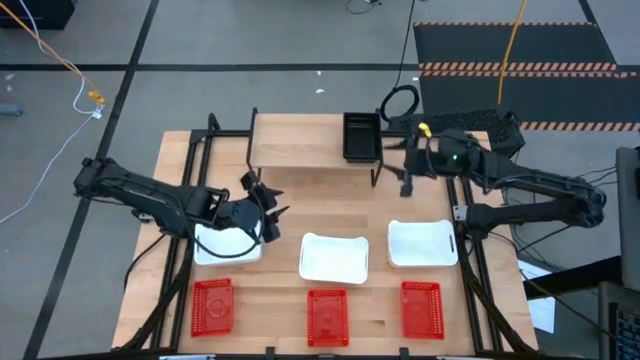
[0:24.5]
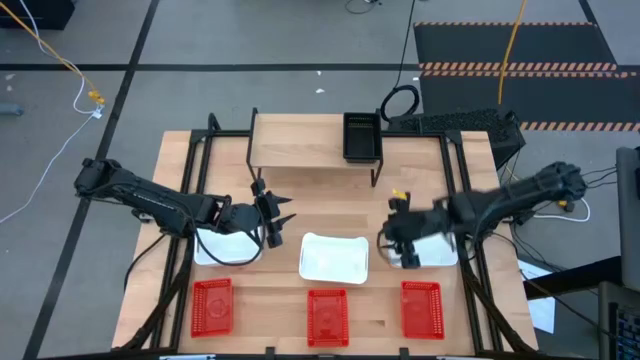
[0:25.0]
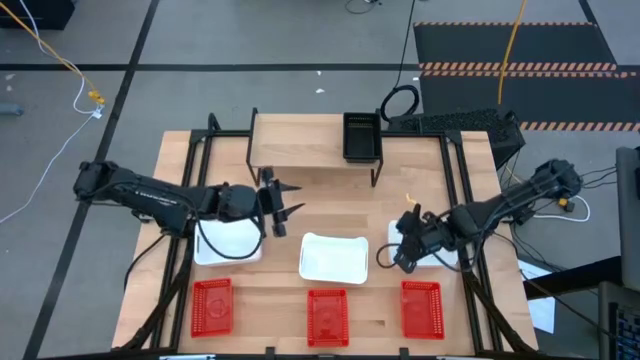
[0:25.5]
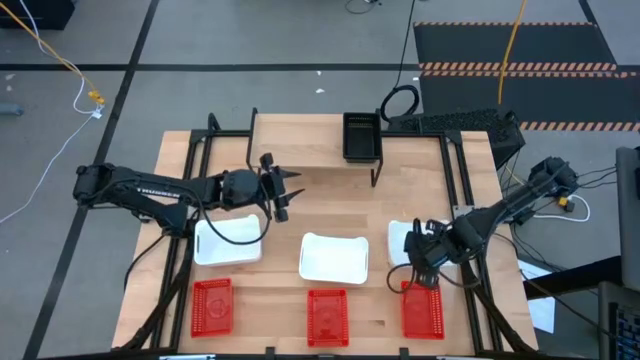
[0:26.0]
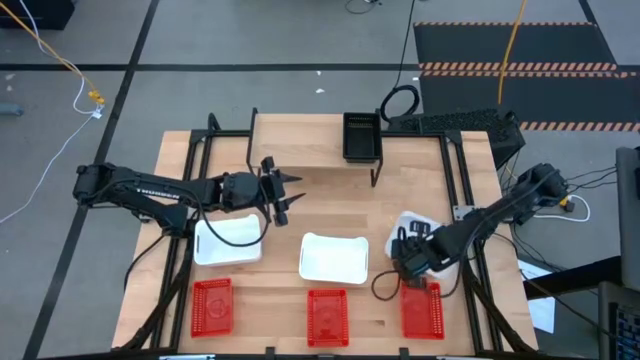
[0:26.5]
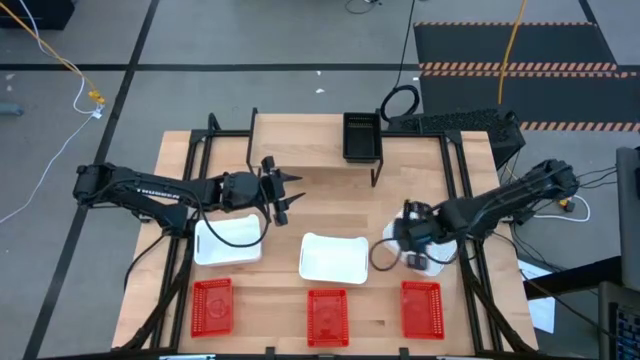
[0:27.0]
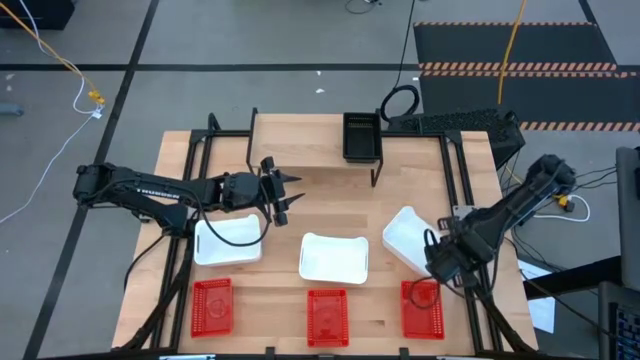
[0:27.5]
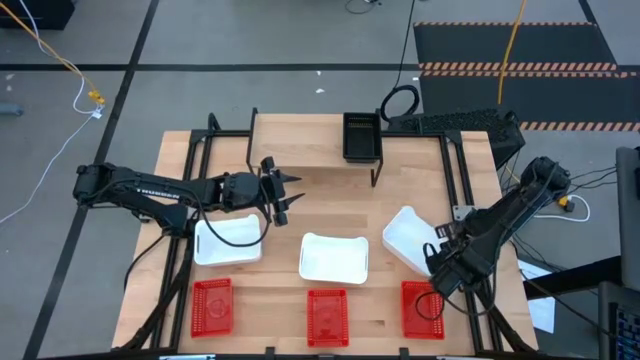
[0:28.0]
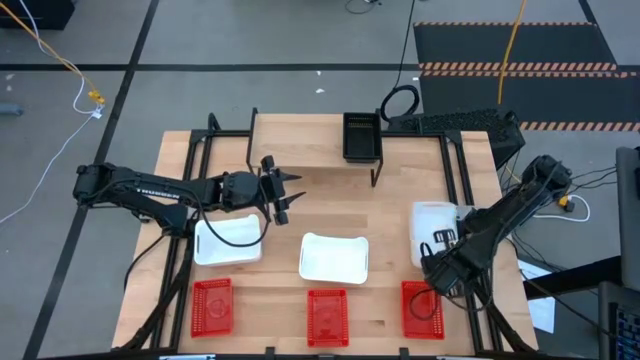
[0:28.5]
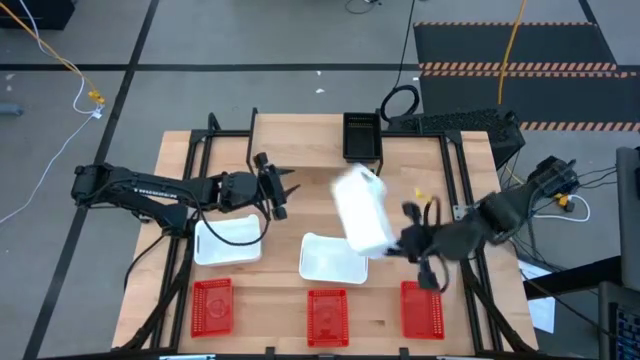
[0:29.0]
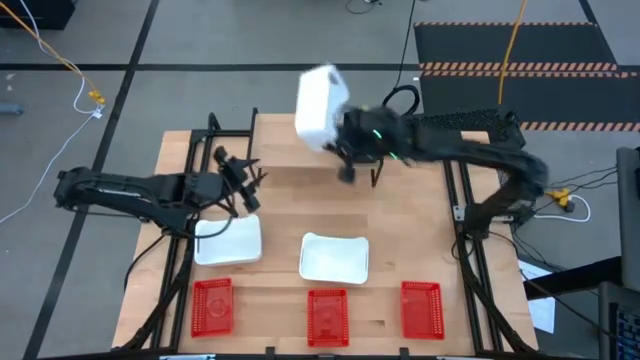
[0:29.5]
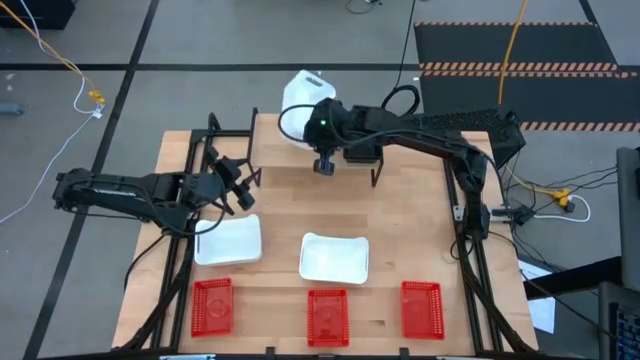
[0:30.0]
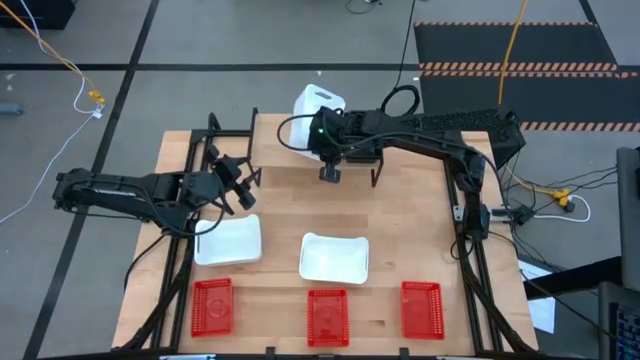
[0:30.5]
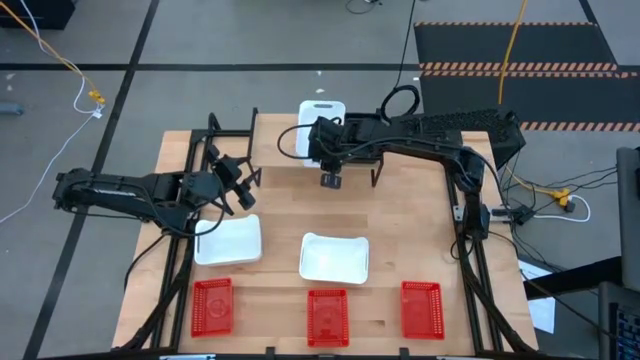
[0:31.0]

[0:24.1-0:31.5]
Task: Stack baskets on shelf by color
Put the right white bin on the shelf

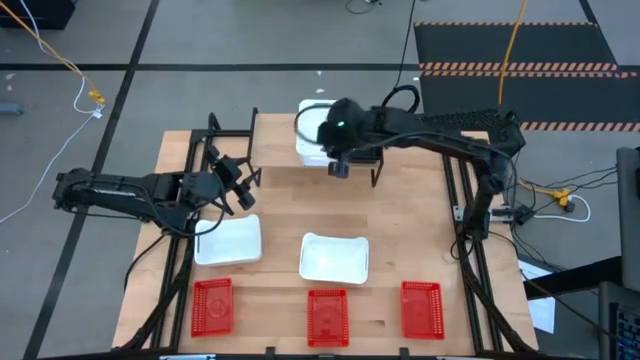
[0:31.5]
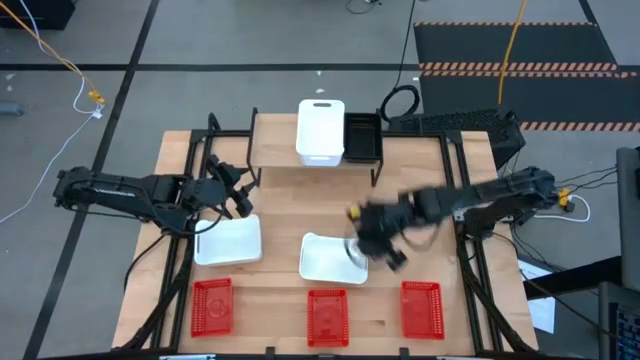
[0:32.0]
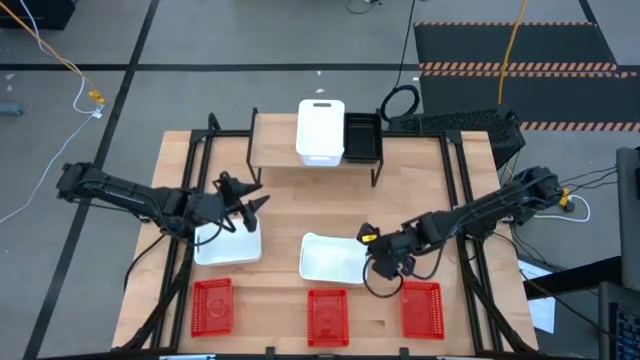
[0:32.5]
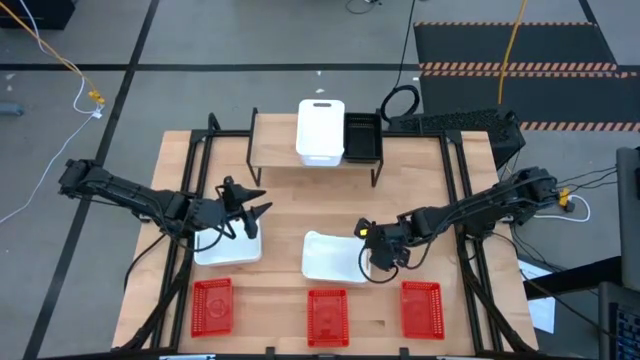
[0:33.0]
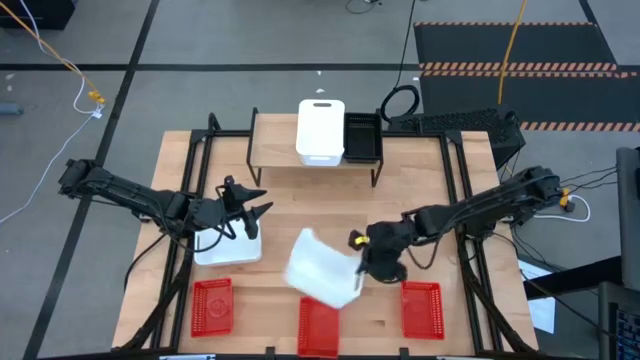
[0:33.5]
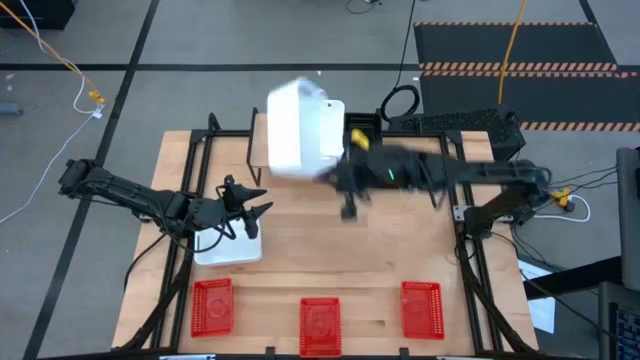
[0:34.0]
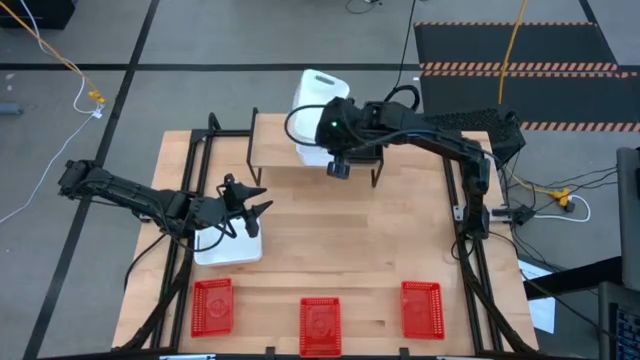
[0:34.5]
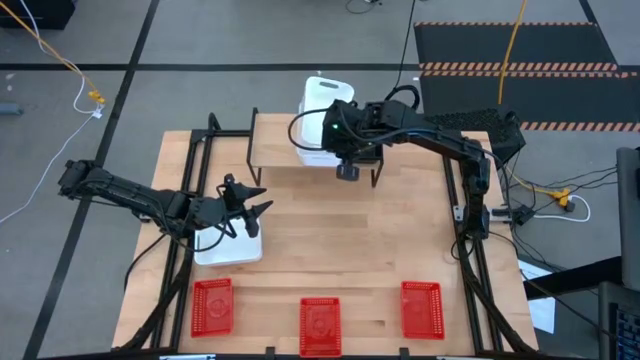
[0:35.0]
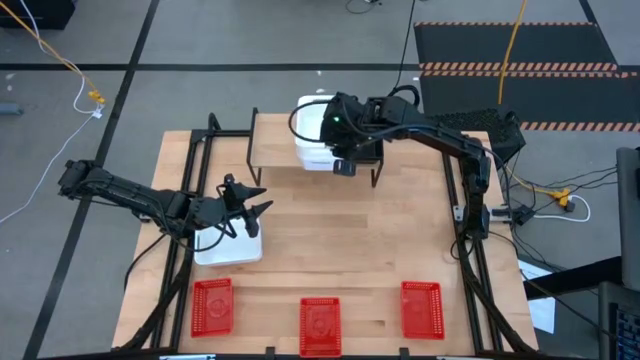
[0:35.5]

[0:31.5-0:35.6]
Stack the right white bin on the white bin

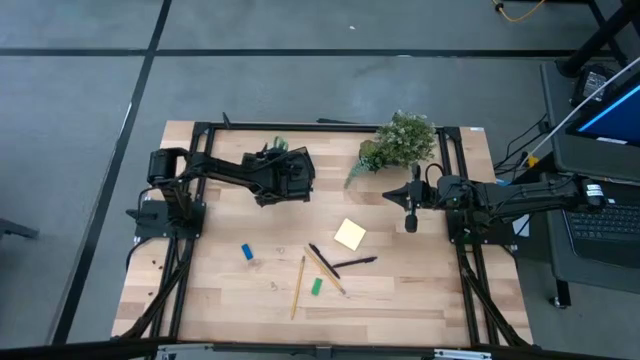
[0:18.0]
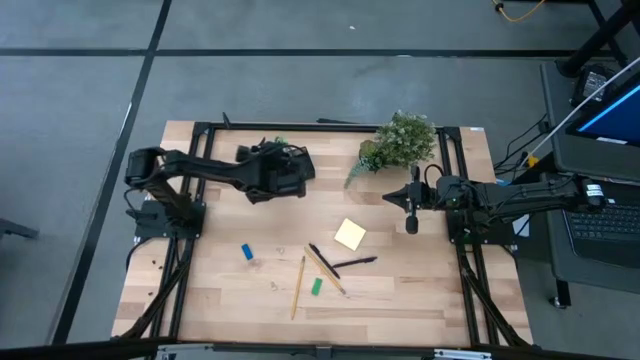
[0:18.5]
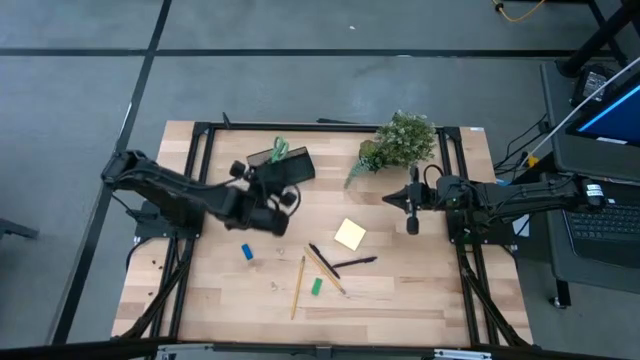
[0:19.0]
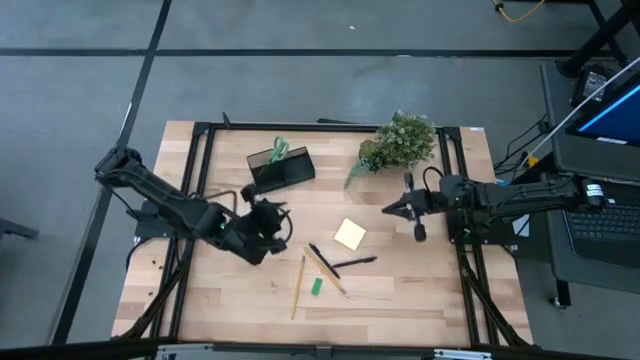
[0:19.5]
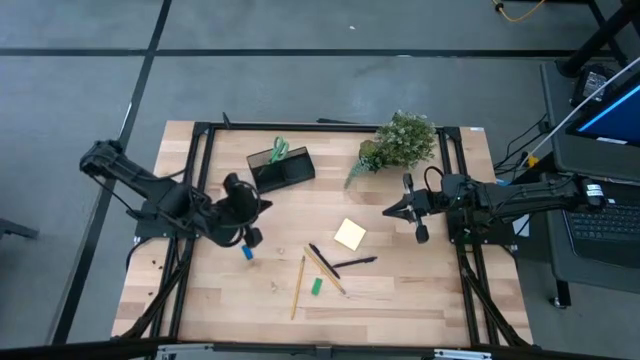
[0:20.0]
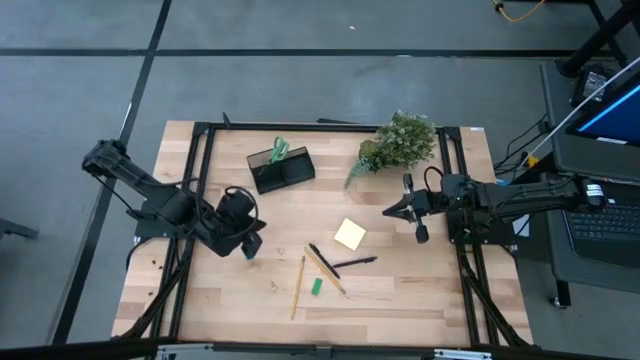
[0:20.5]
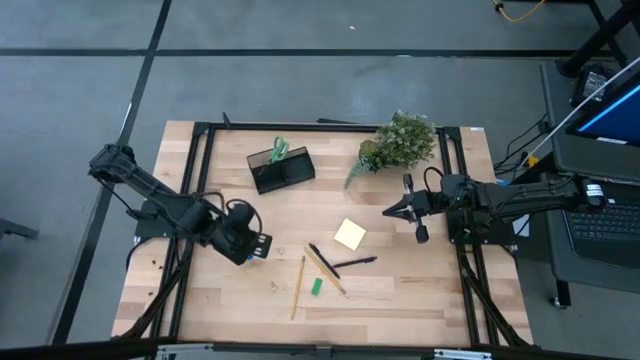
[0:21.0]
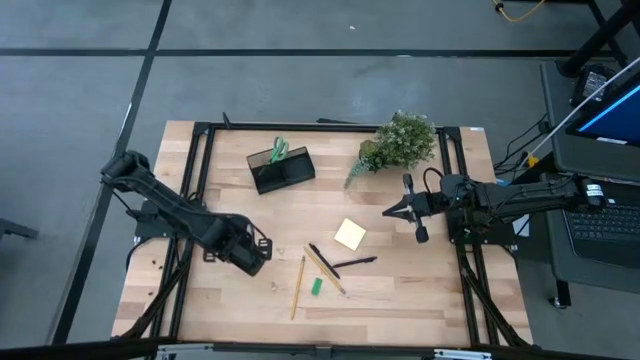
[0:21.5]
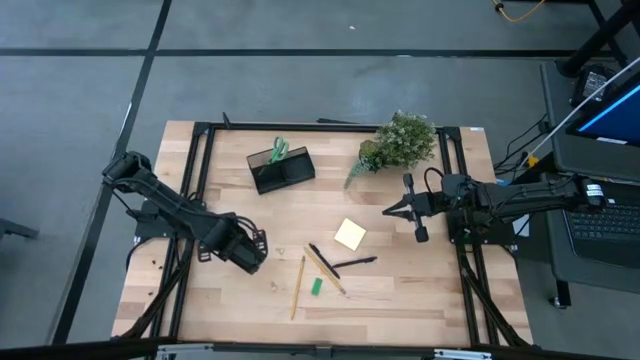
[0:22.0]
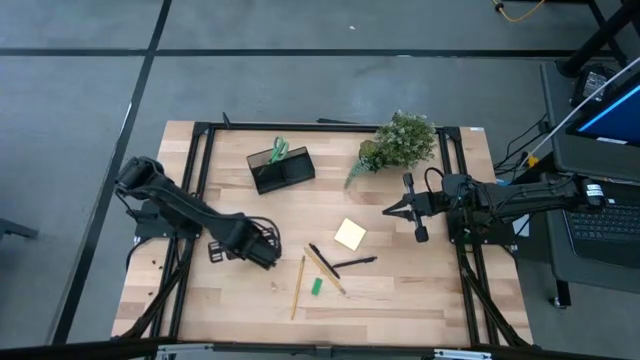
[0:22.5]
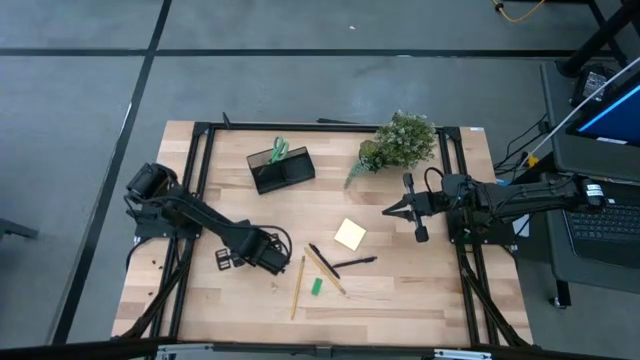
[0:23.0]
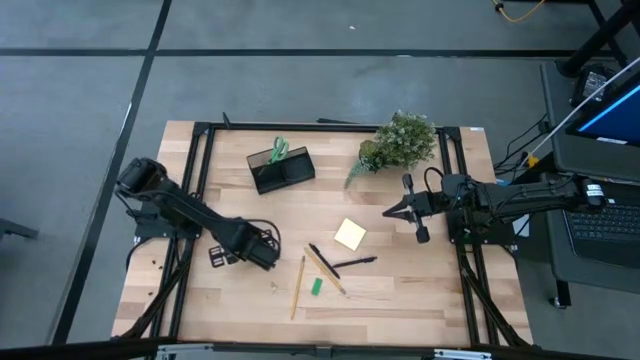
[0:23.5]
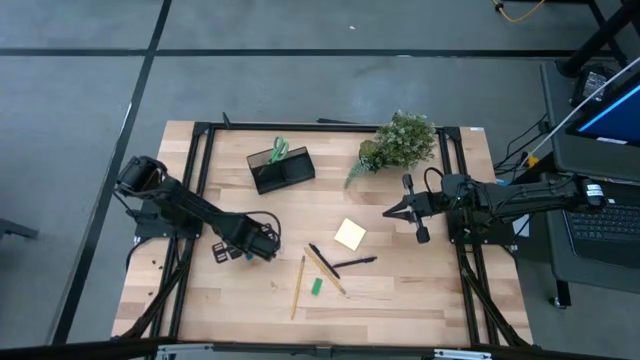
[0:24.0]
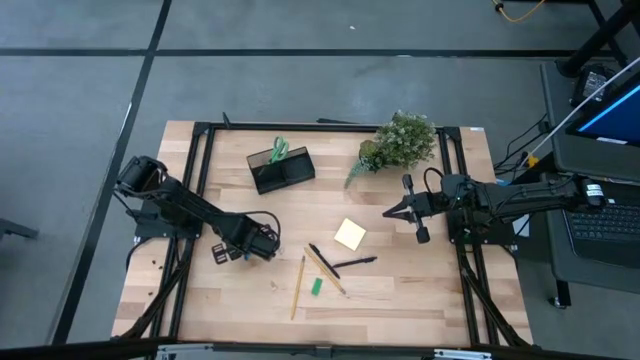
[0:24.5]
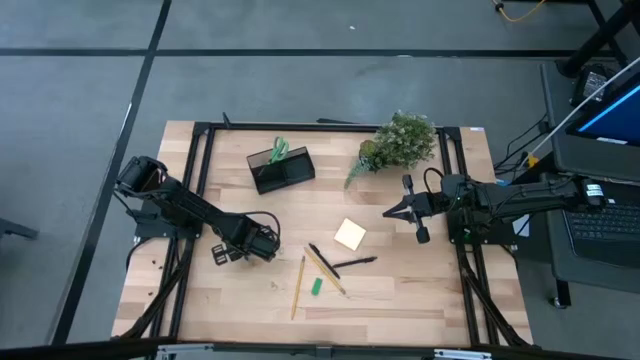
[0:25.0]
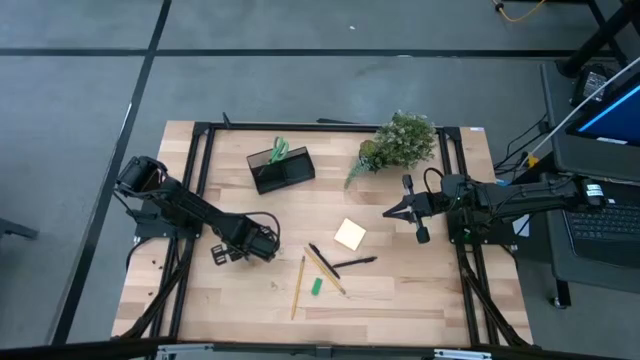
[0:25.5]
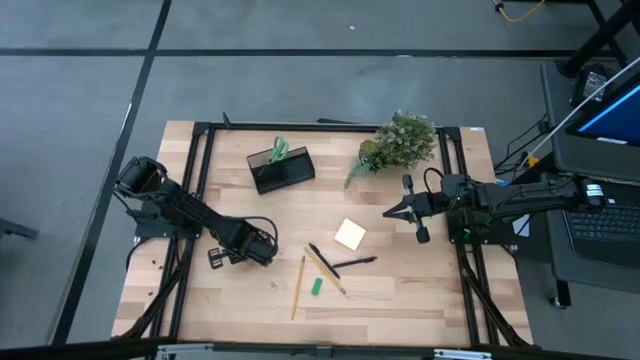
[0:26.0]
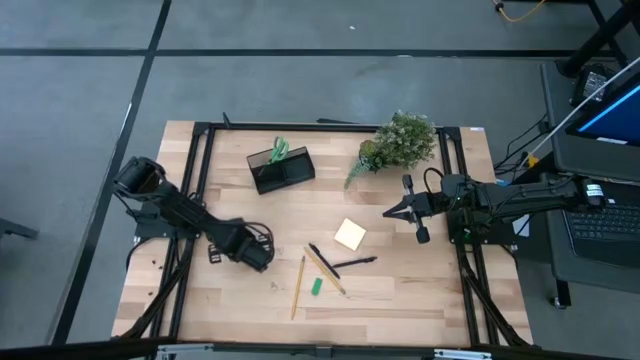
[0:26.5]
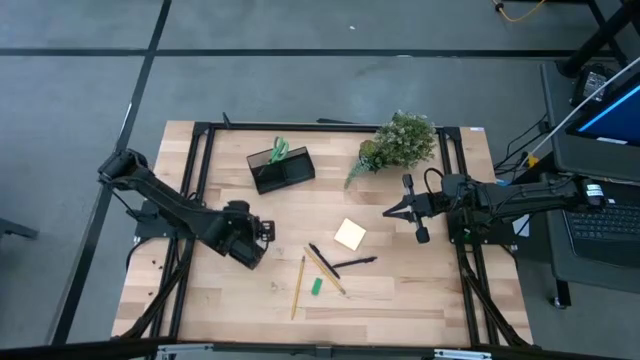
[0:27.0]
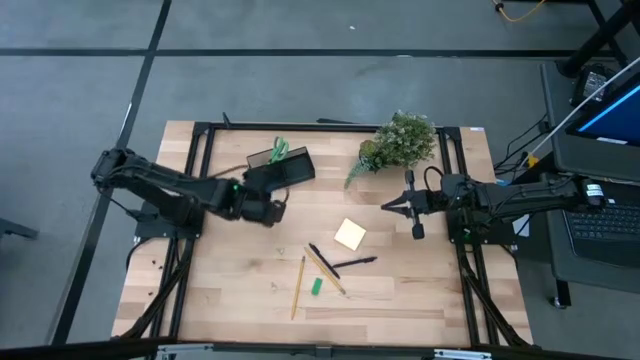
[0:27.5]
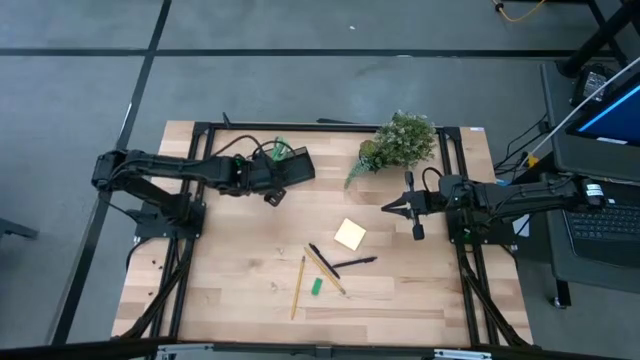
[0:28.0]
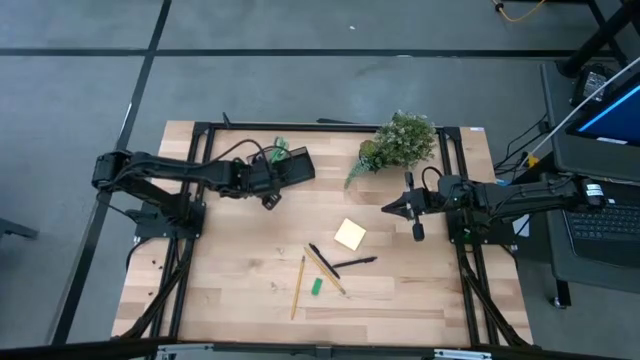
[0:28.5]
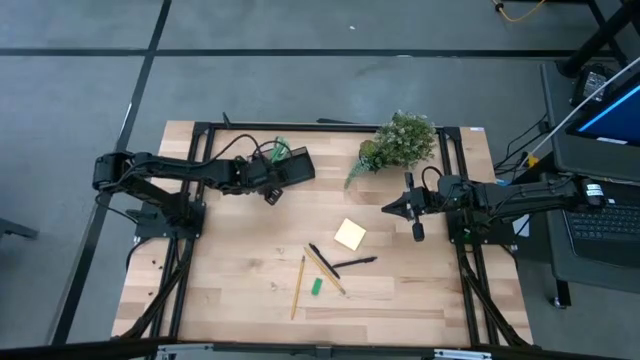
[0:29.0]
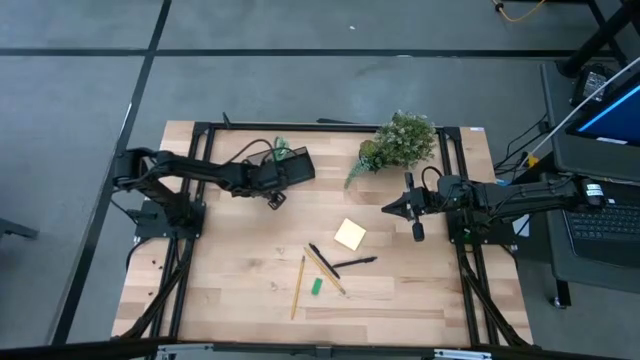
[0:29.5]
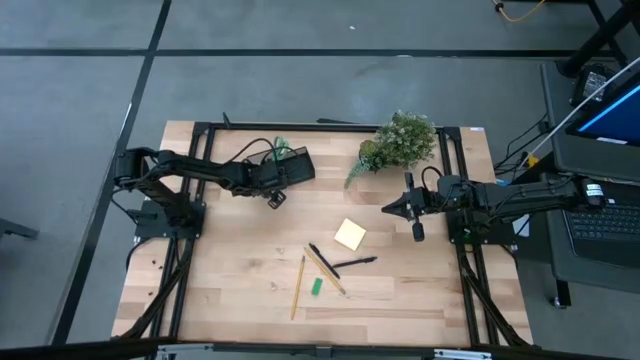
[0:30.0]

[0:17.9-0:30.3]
Task: Pick and place office supplies into organizer
Put the dark blue eraser into the desk organizer
